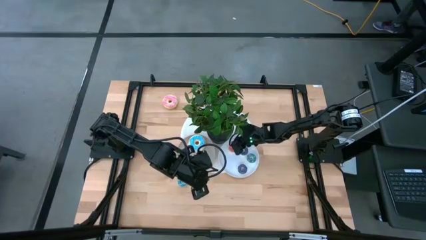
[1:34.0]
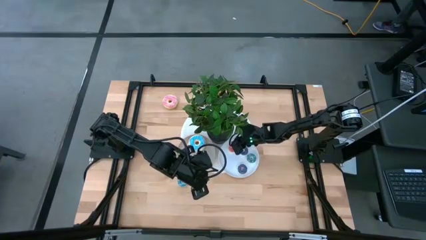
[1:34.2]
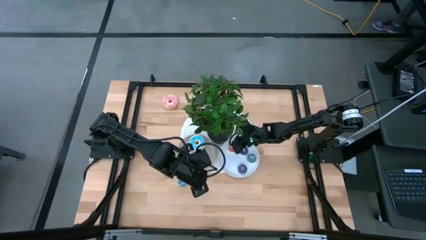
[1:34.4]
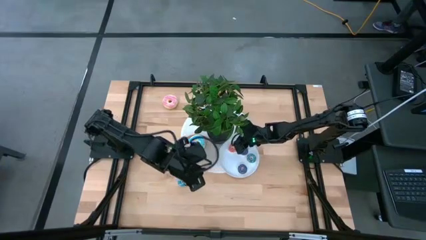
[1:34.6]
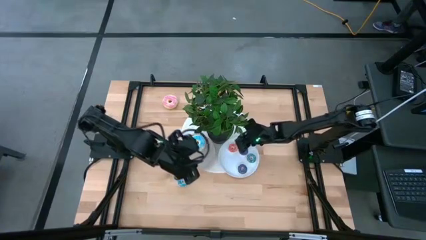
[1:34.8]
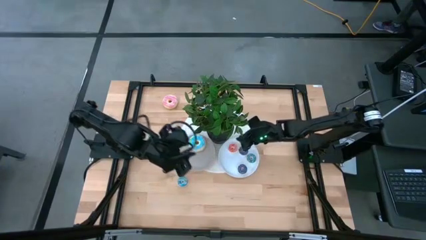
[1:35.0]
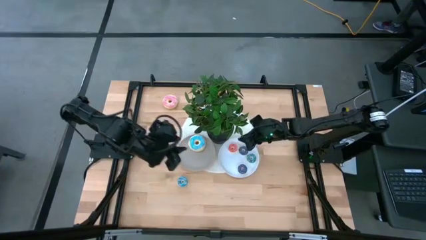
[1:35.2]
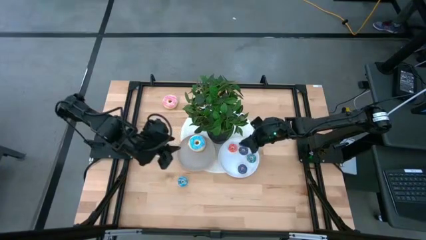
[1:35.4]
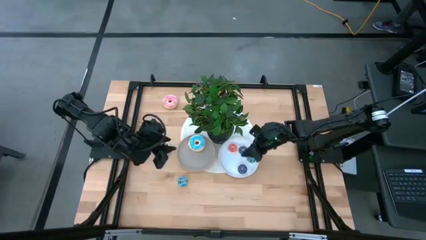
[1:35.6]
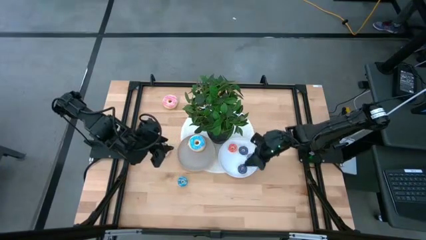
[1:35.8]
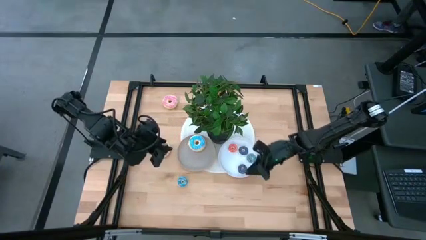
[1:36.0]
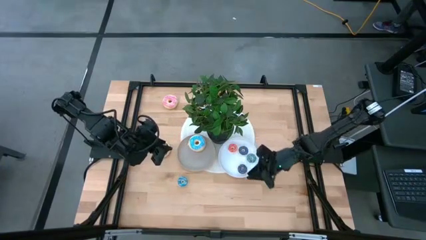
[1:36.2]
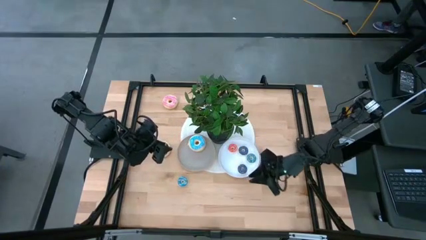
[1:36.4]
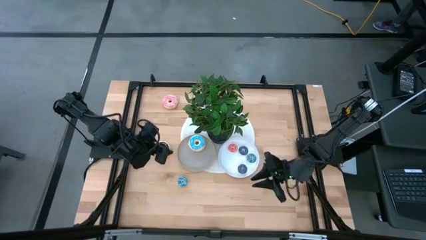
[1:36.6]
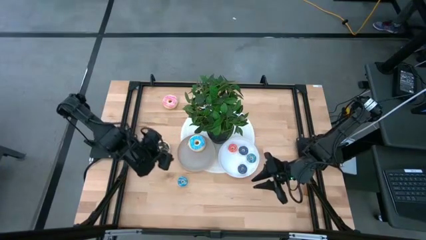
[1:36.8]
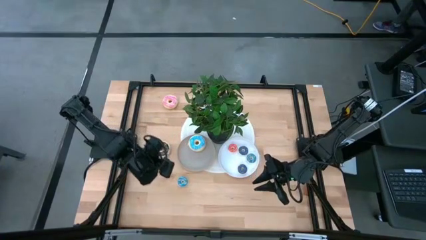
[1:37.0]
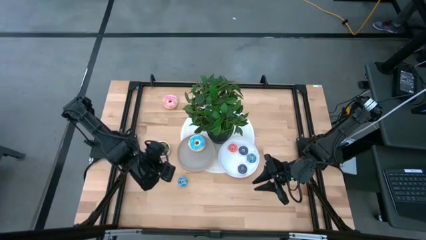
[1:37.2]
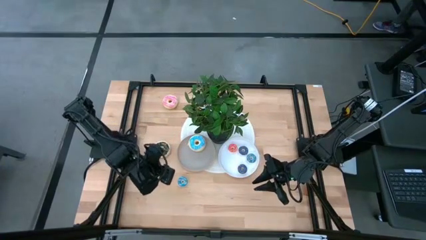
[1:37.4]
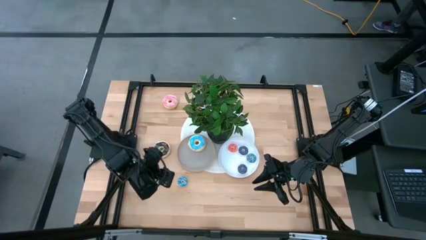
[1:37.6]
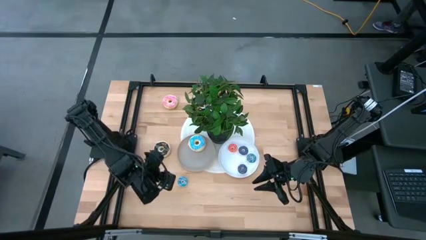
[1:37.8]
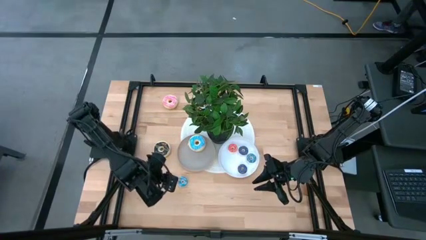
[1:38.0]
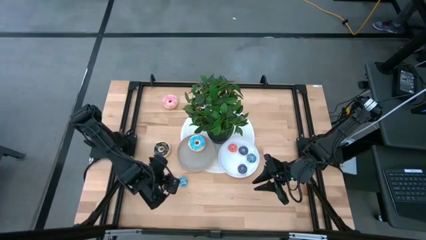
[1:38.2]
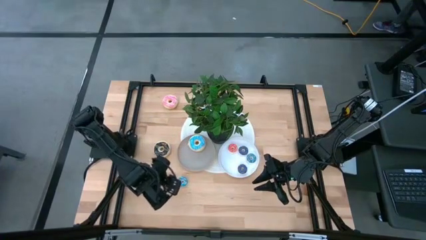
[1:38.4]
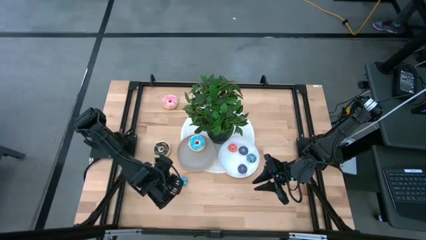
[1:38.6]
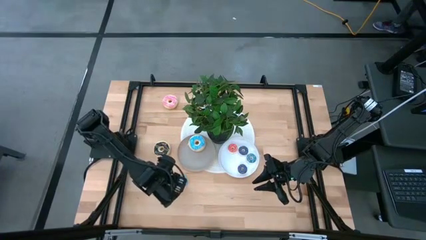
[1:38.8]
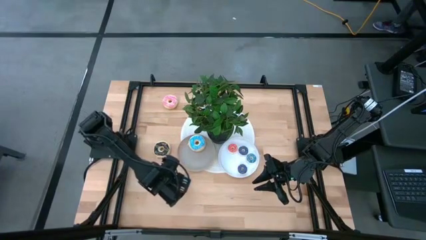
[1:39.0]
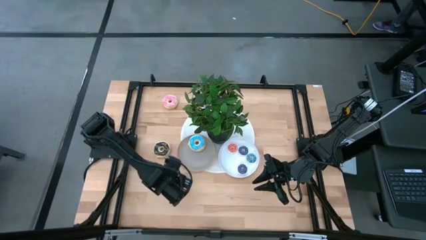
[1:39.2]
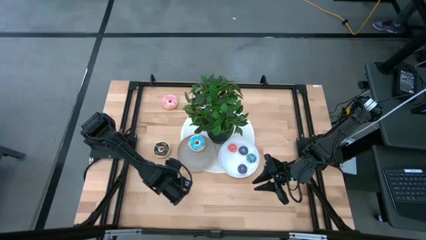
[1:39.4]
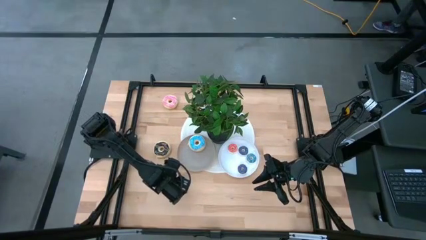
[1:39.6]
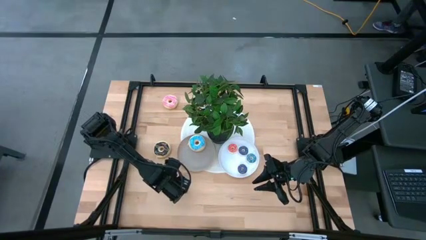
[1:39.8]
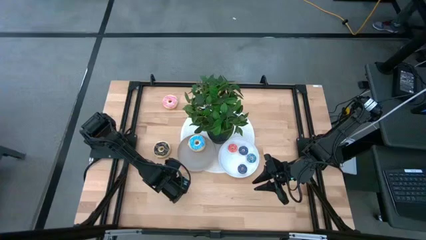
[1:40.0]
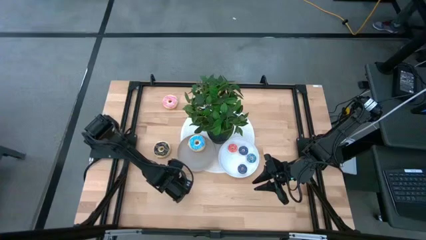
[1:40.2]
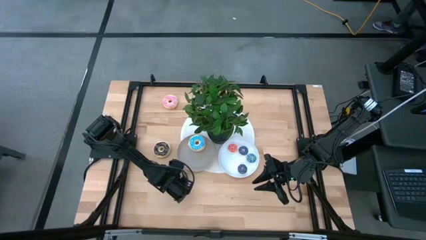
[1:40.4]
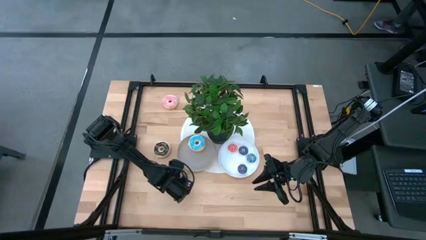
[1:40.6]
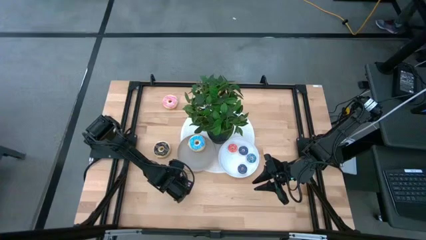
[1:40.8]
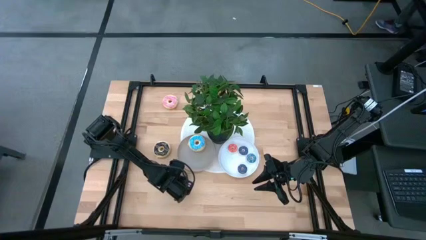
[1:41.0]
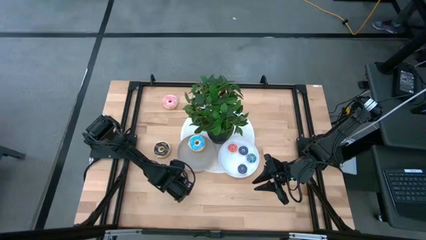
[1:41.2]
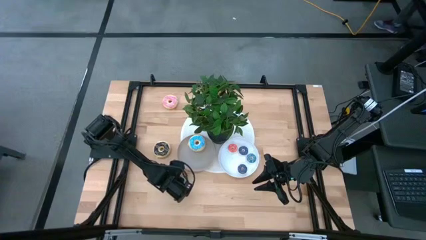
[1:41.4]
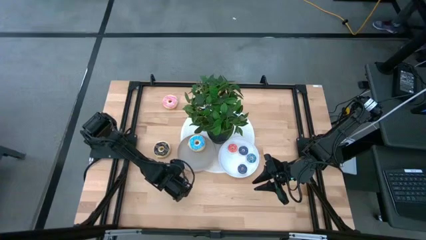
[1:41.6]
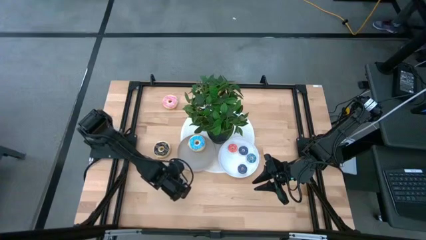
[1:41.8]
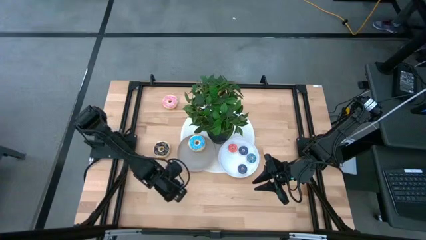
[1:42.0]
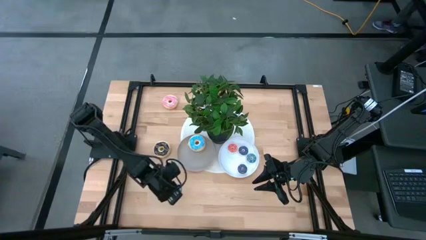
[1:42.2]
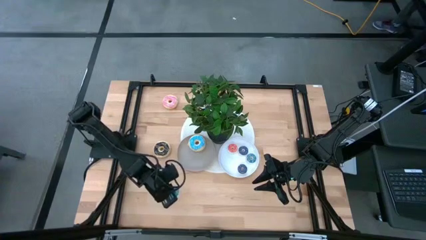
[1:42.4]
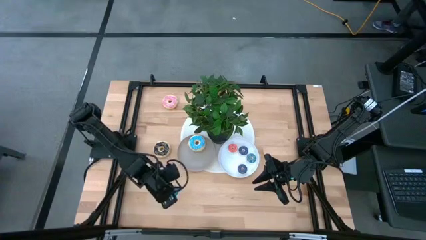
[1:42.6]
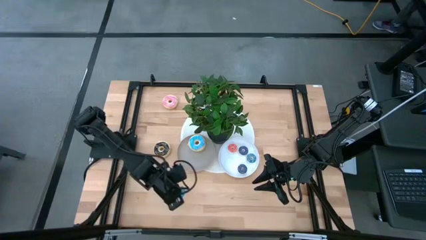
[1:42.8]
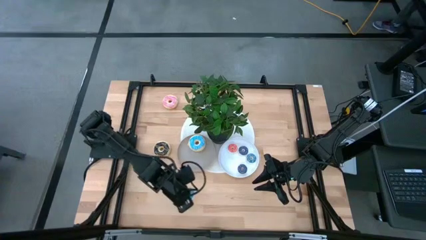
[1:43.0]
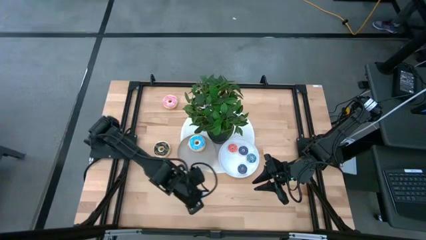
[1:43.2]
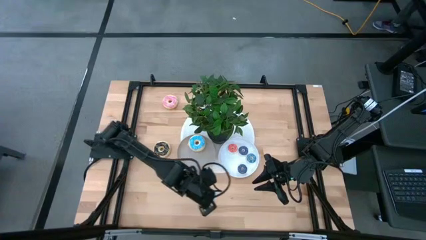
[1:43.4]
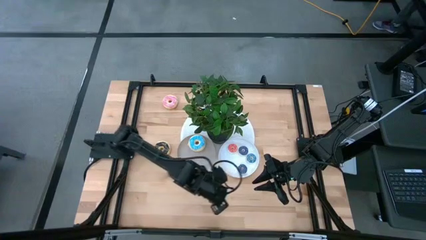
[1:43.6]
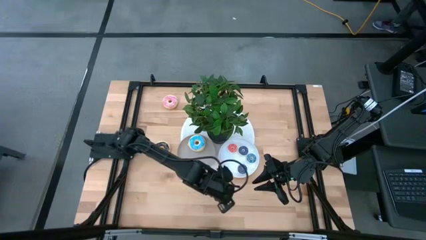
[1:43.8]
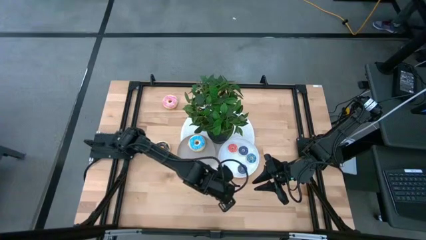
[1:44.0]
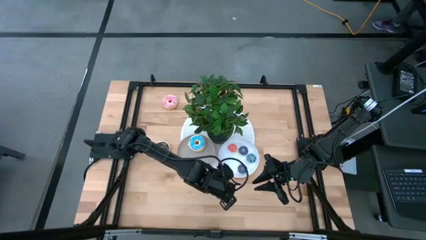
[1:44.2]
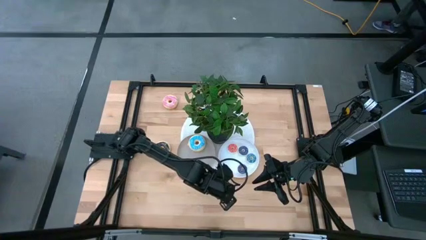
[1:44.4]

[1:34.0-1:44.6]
Task: Pick & Place donuts
Put the small blue donut on the white plate

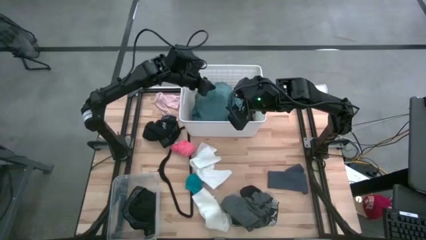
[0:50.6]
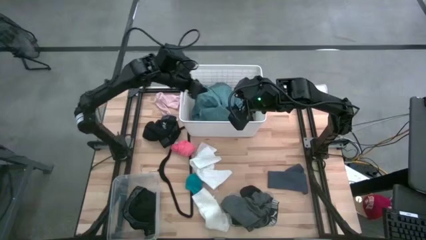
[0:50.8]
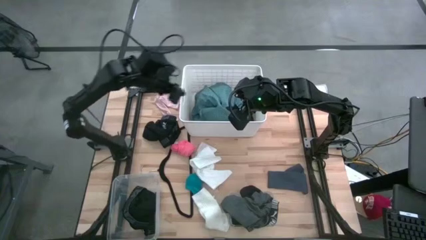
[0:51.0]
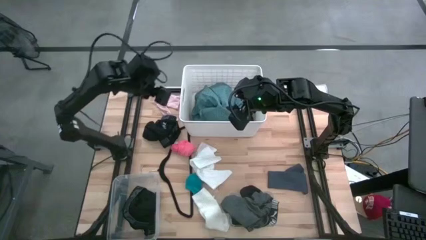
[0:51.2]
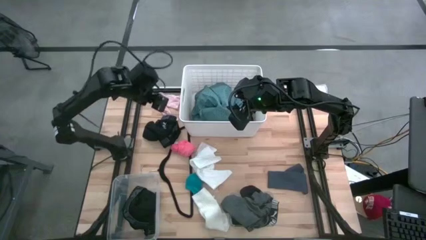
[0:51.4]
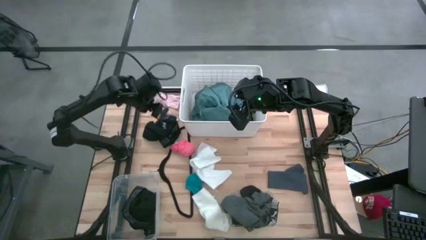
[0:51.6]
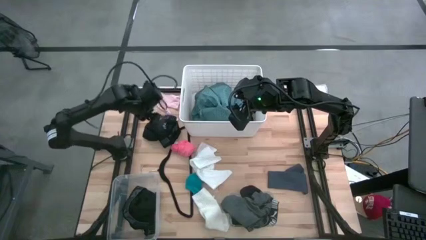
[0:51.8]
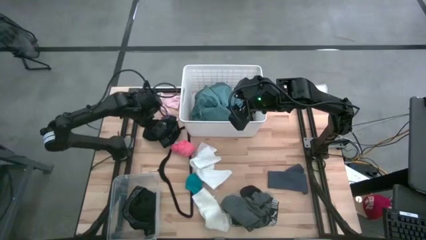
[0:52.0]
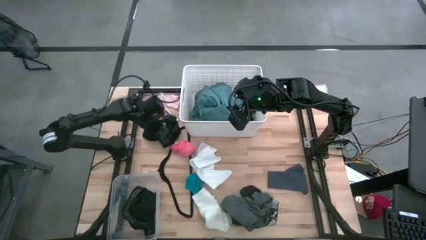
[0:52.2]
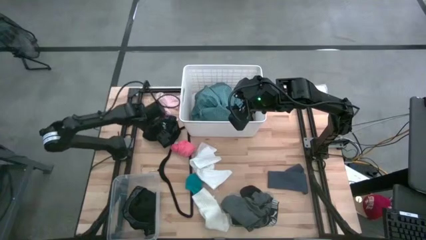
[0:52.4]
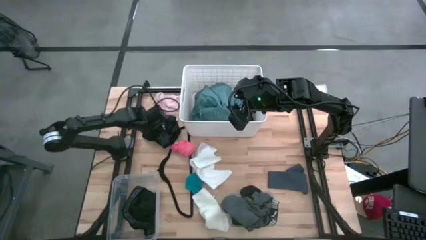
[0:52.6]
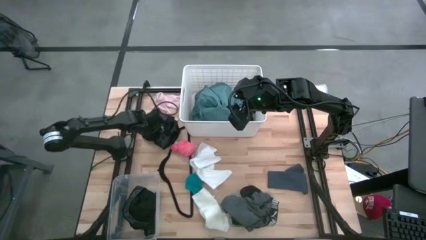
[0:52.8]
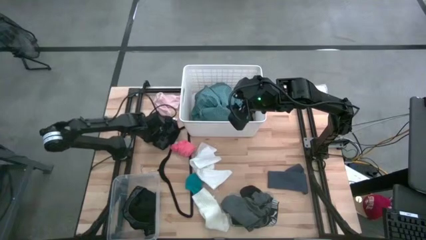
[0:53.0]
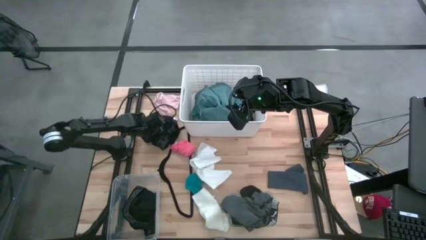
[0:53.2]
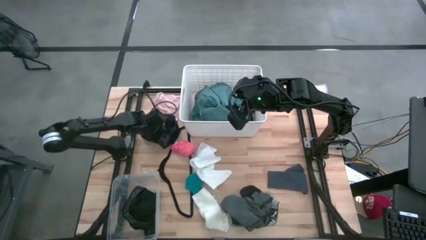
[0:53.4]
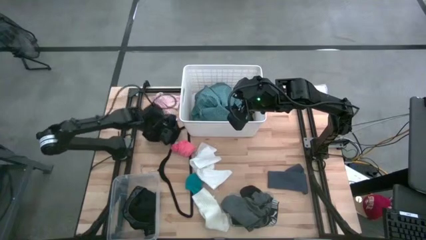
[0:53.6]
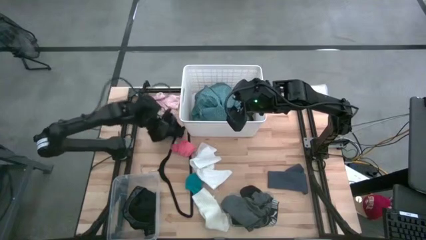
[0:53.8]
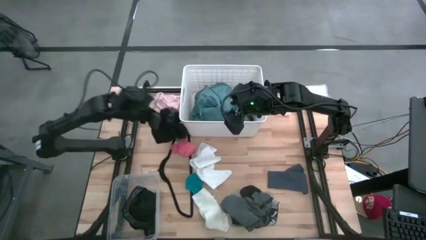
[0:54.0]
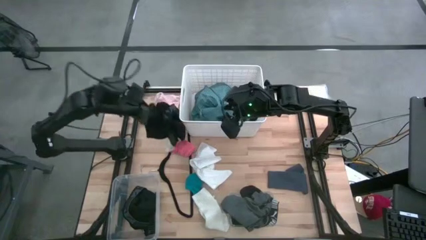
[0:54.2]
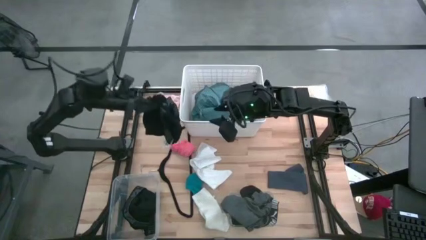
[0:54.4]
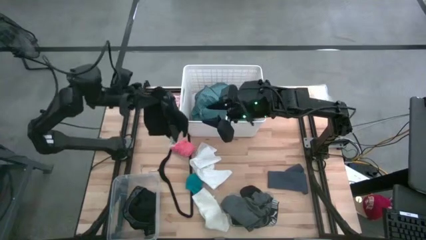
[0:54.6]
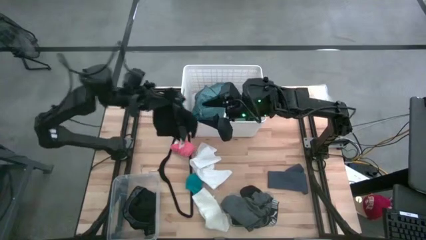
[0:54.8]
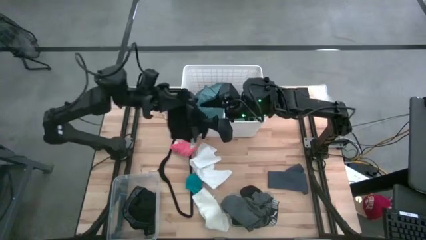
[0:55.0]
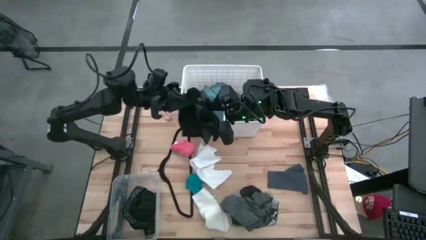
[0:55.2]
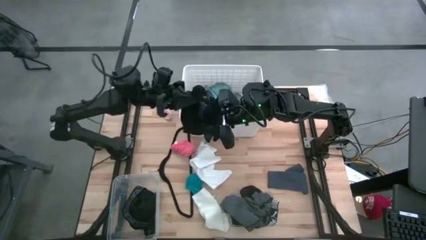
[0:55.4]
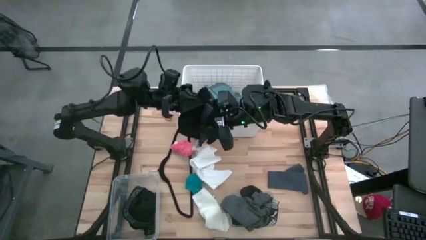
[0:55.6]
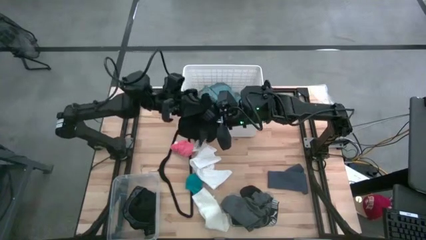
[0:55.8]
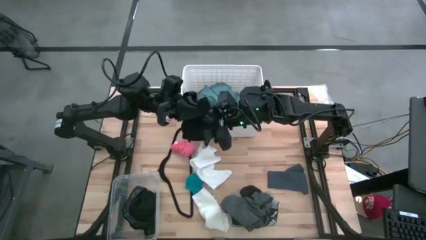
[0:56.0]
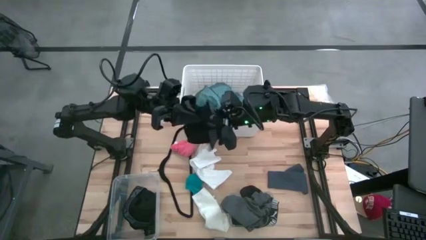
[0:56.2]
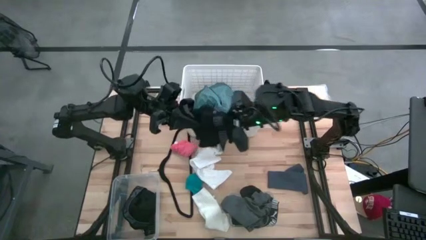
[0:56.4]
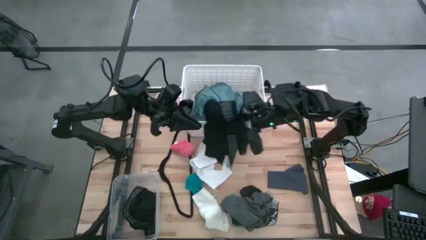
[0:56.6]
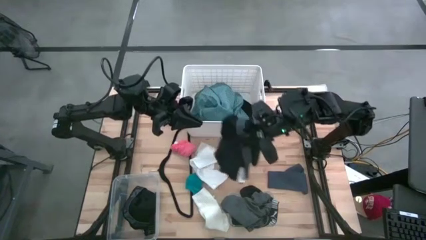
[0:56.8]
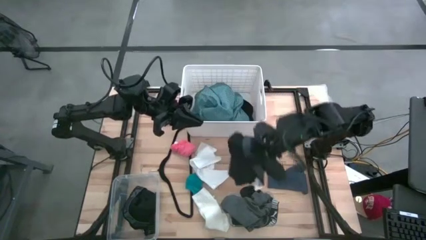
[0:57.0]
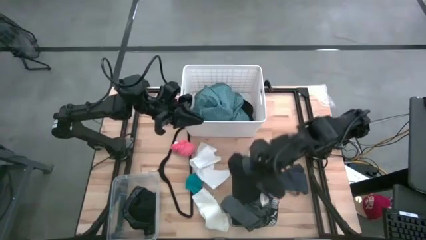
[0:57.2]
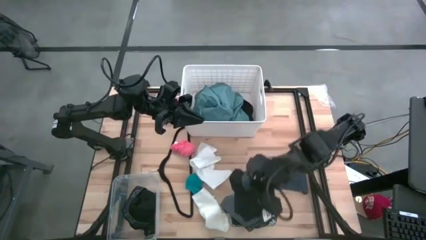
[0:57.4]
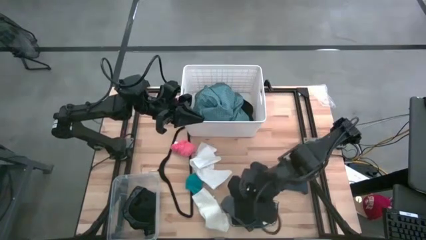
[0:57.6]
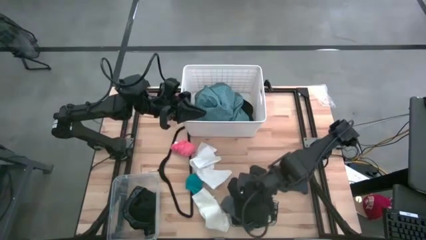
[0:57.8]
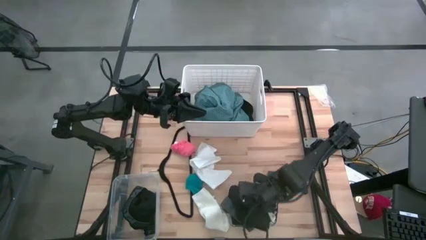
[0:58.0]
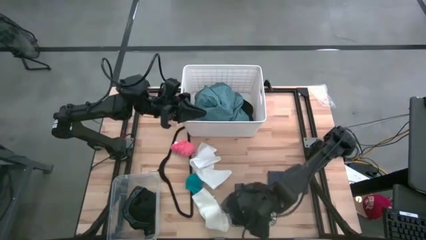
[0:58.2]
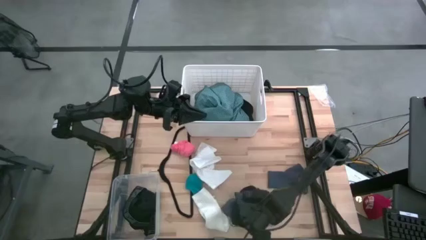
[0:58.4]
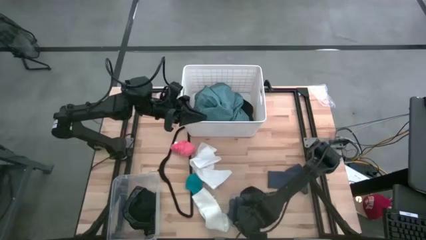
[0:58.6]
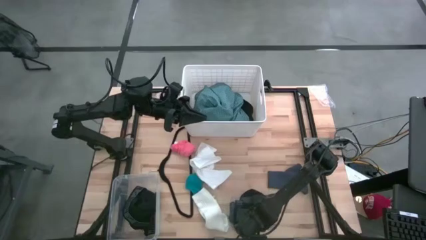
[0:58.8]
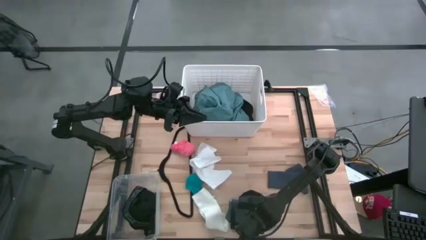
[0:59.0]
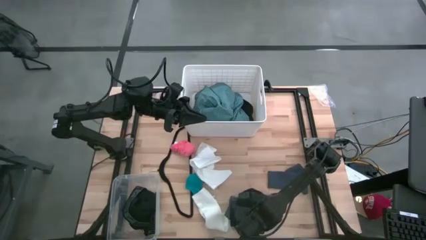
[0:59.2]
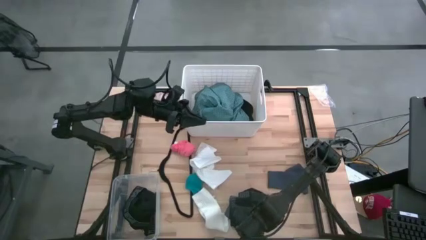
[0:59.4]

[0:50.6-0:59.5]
Task: Pick & Place Cloths
Put the black boxer into the right transparent bin
